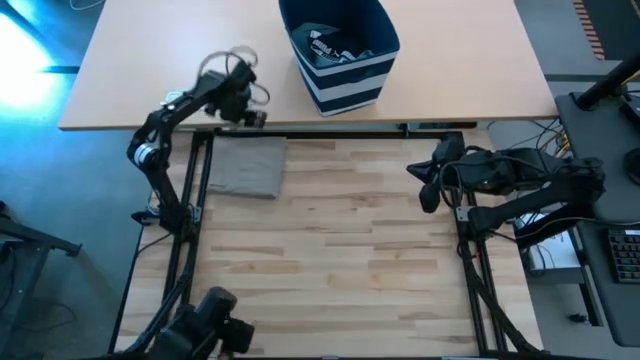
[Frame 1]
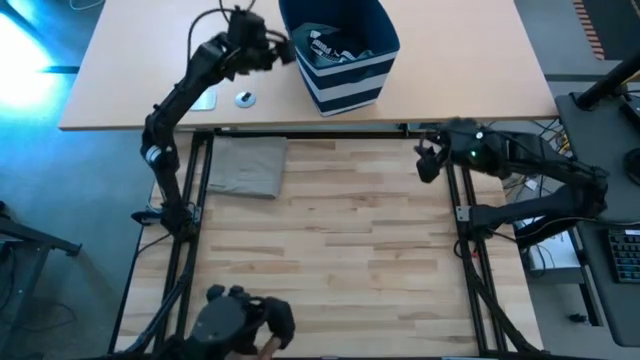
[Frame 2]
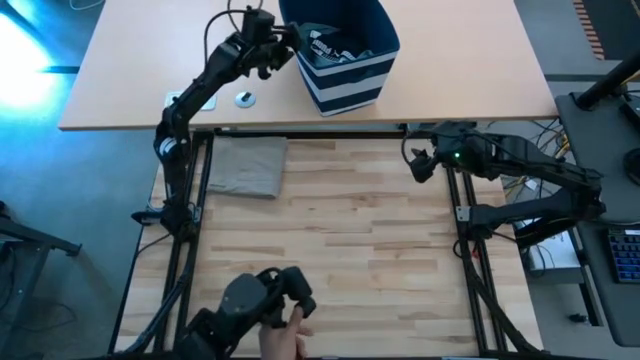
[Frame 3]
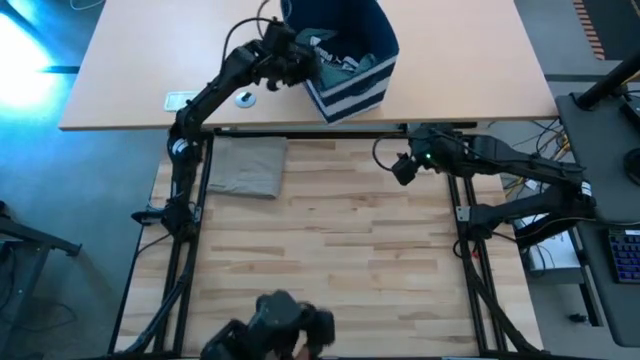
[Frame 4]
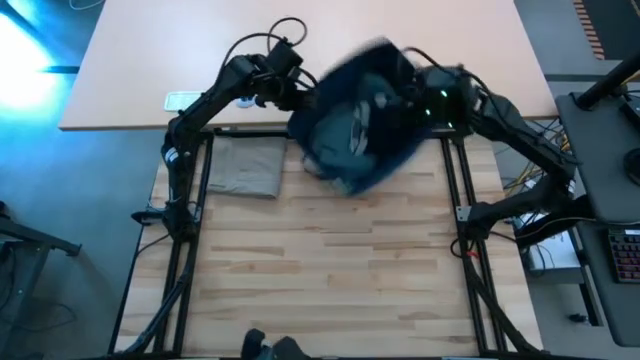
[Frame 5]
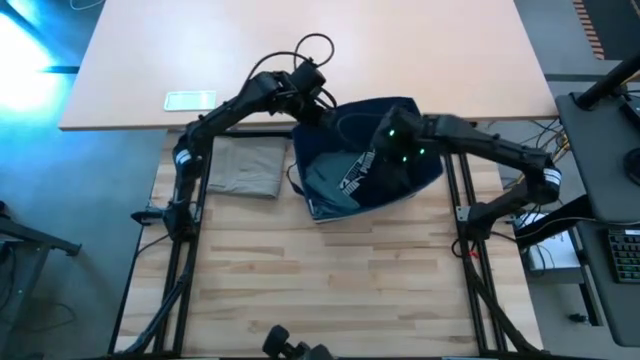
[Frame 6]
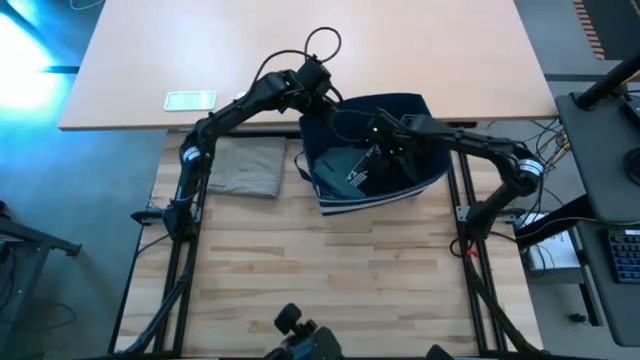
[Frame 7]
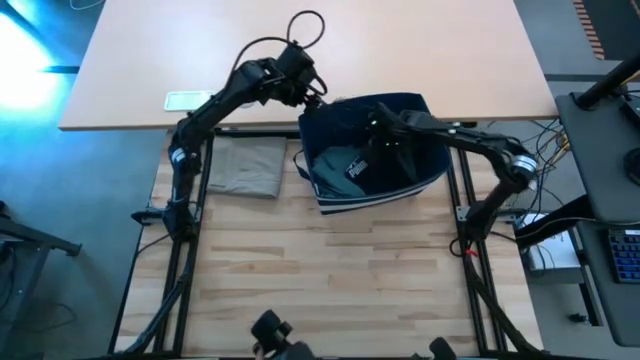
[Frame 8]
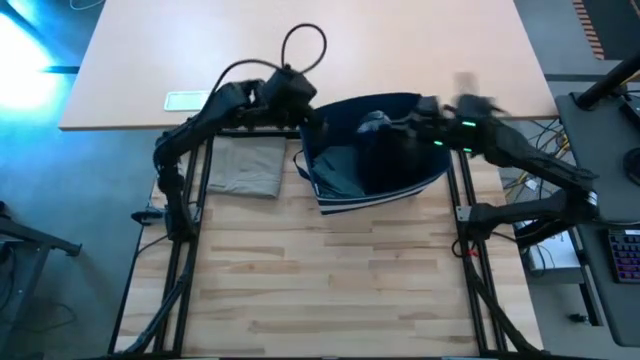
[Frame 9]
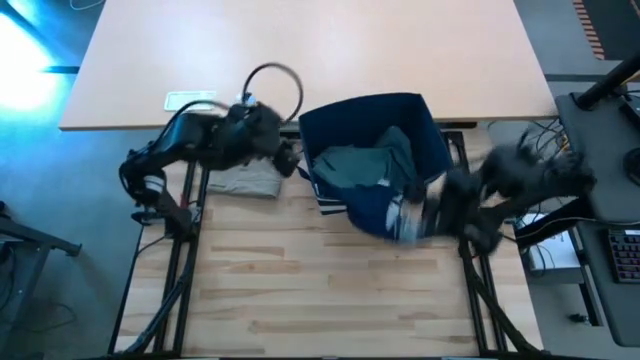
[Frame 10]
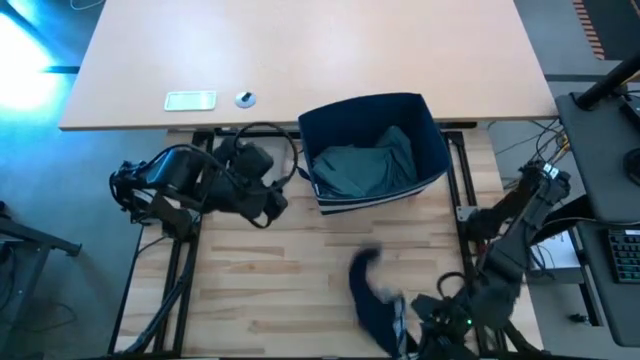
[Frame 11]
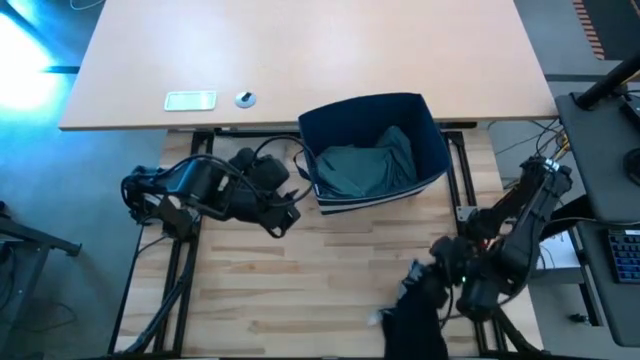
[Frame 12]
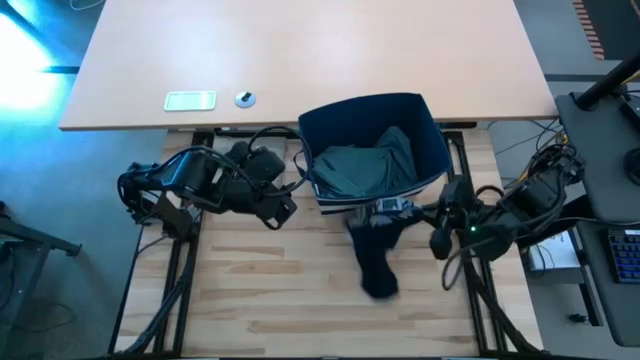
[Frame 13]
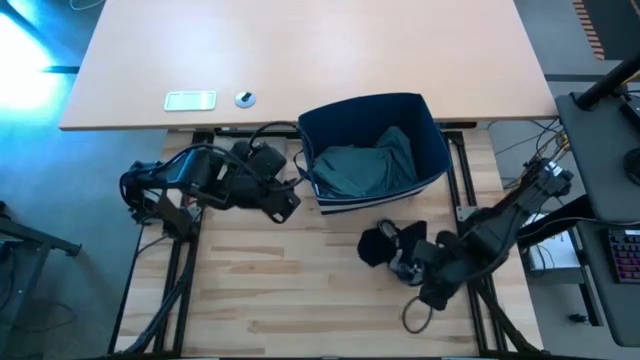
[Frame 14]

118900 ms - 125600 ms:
Task: Fold Laundry from Bin
Remove the black underwear from the laundry basket

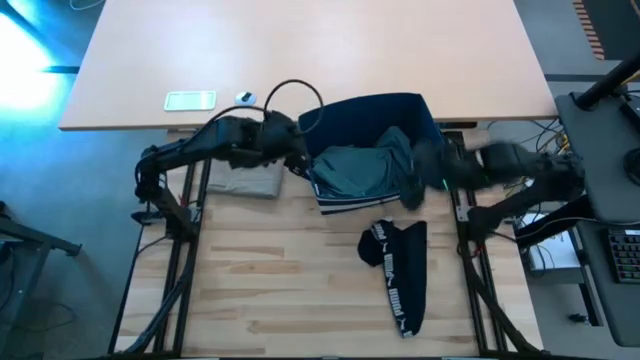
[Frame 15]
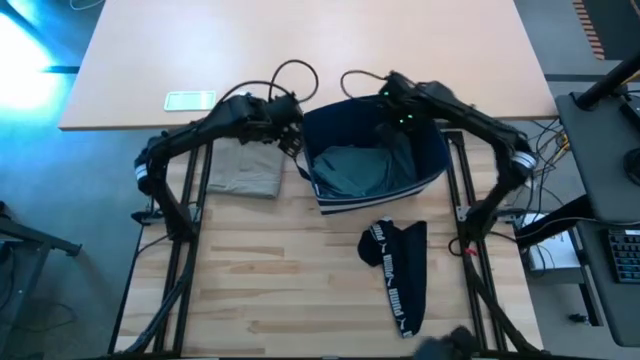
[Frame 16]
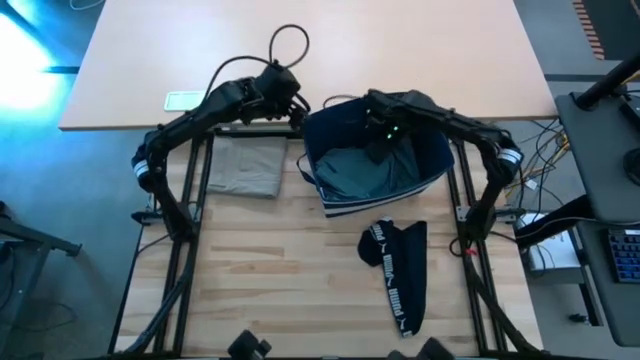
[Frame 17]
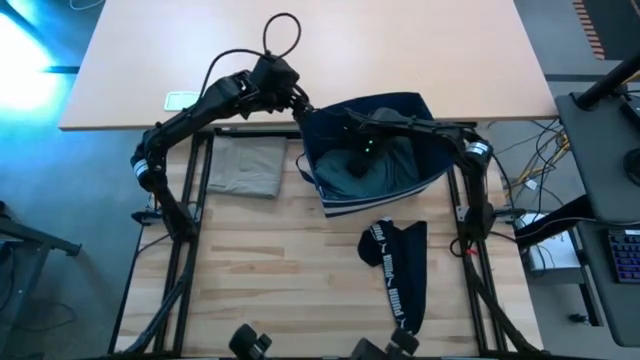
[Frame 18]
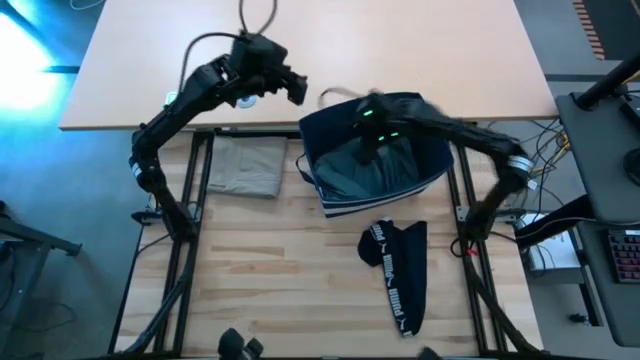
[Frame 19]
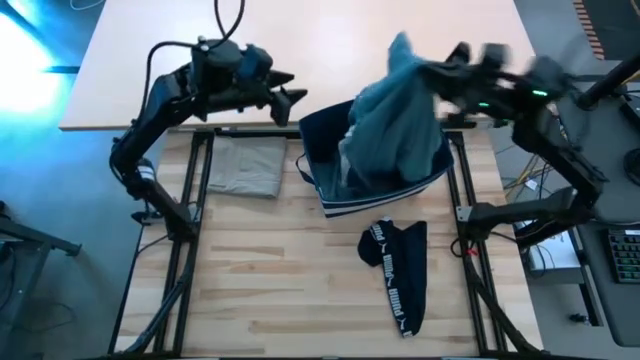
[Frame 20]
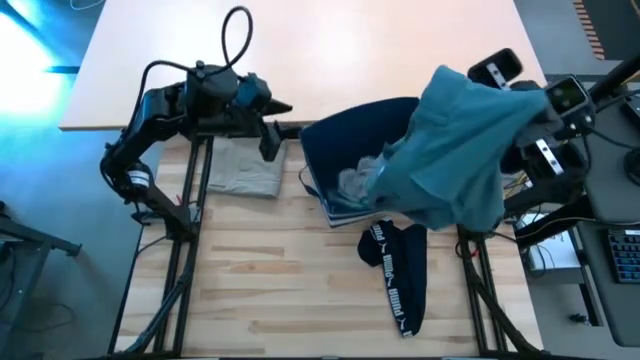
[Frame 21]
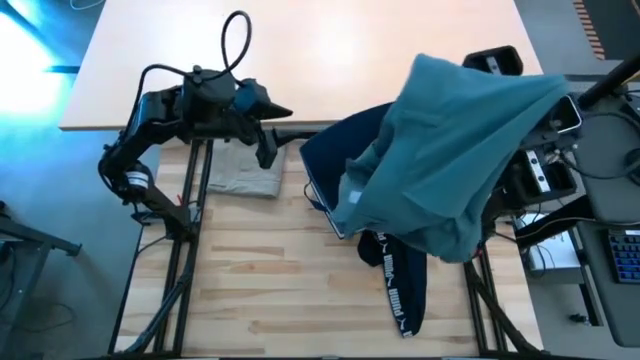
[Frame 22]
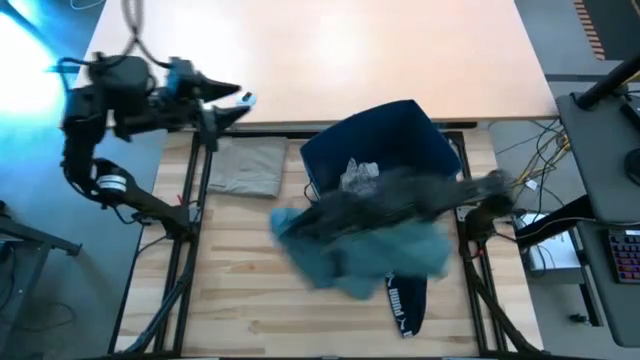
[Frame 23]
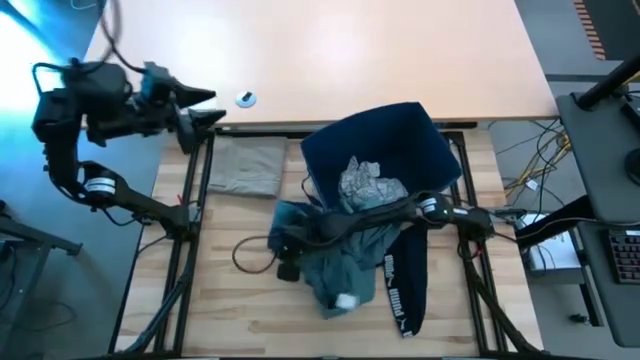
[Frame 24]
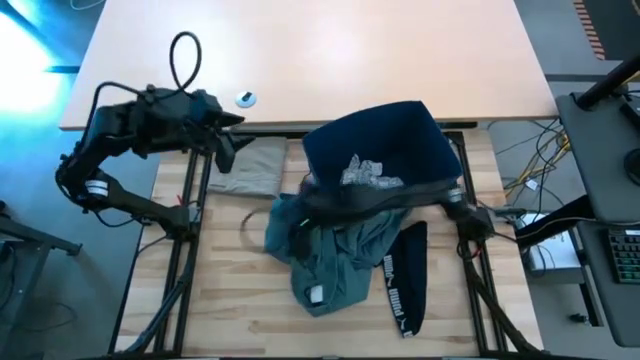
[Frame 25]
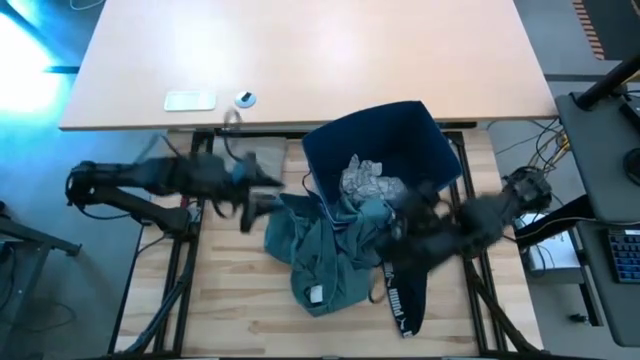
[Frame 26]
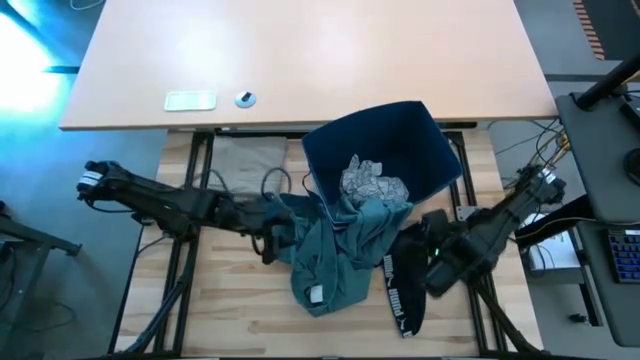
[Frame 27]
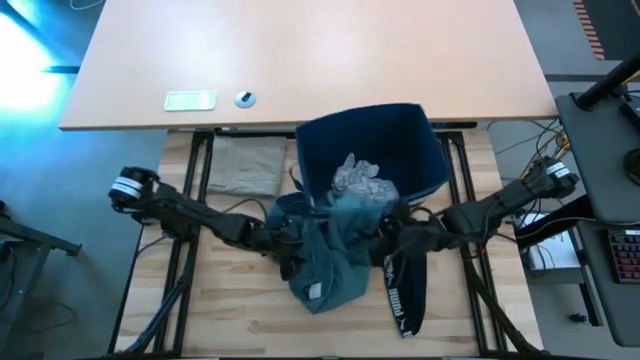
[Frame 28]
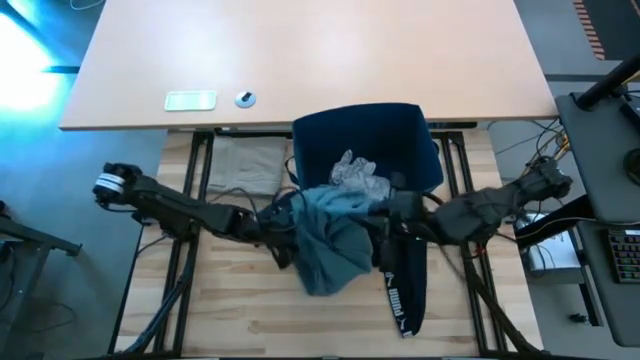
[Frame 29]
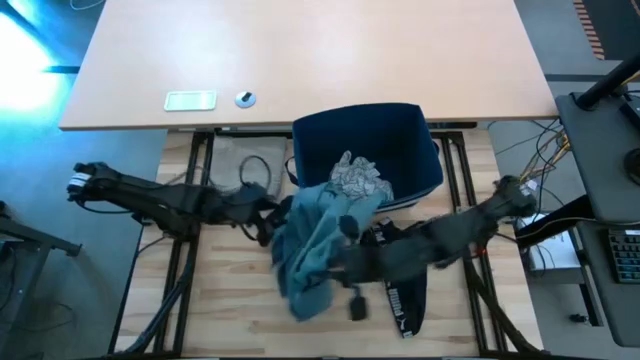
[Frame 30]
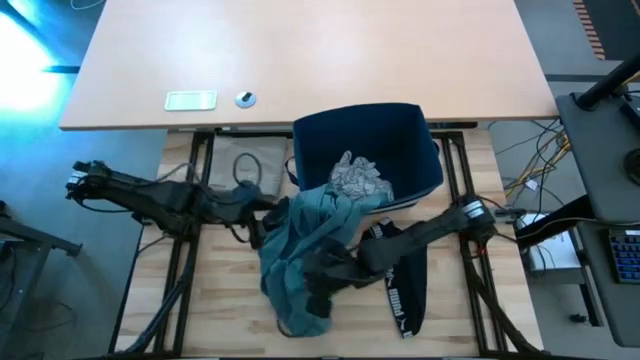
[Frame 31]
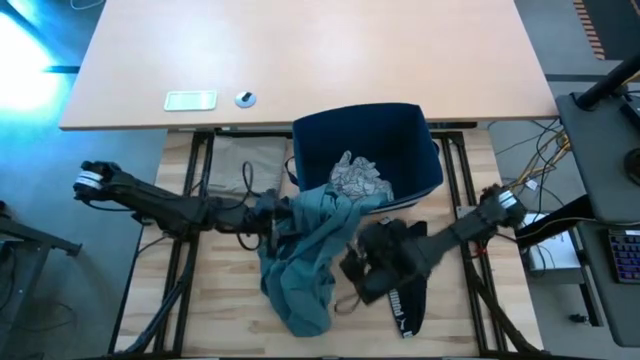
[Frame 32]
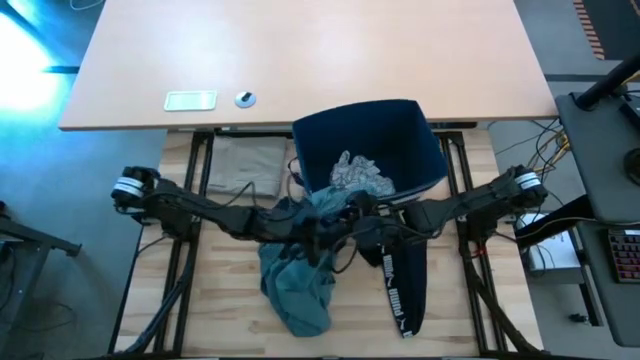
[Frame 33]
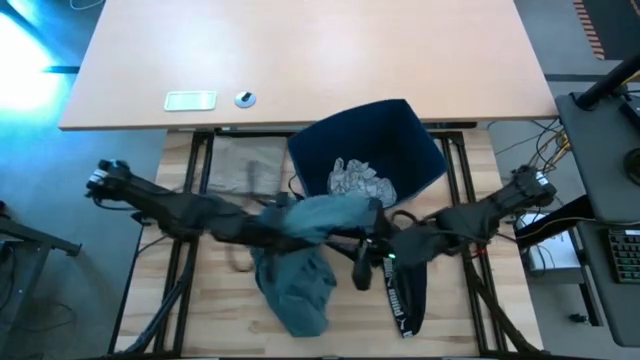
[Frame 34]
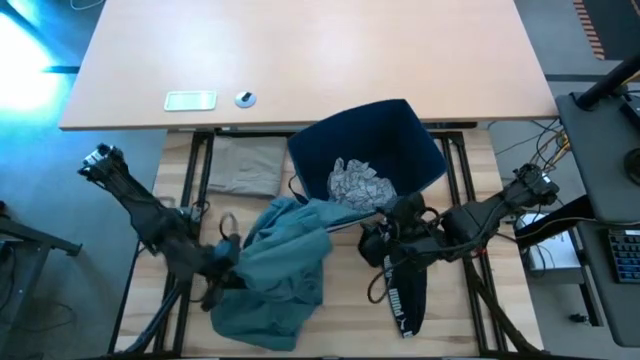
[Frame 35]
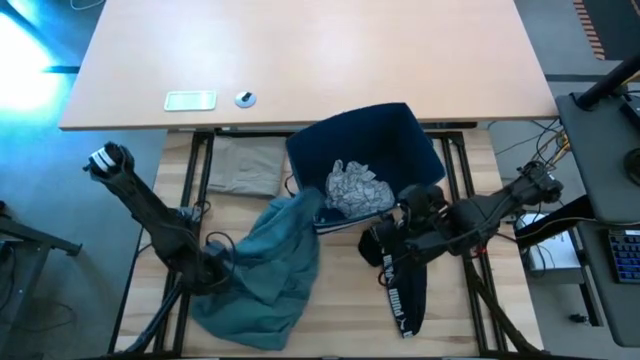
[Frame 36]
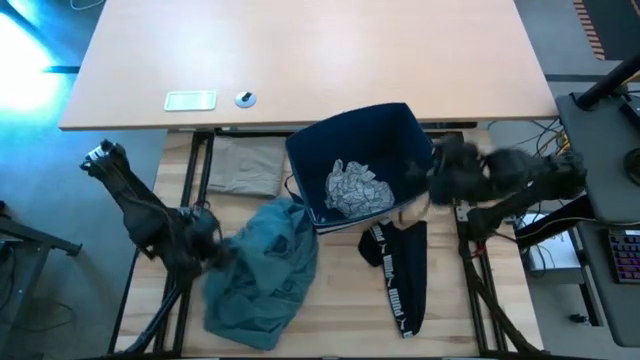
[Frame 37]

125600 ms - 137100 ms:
Remove the gray pants from the laundry basket

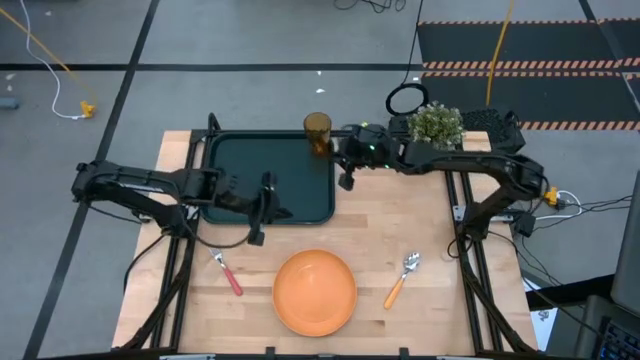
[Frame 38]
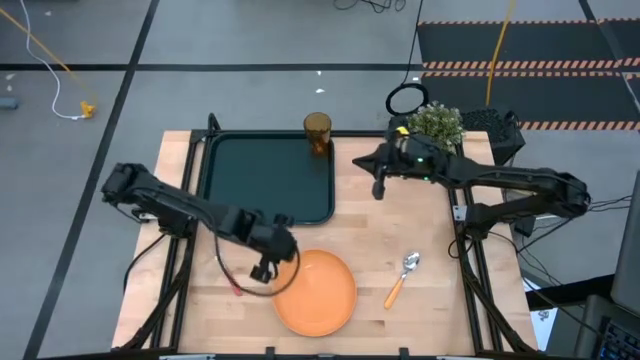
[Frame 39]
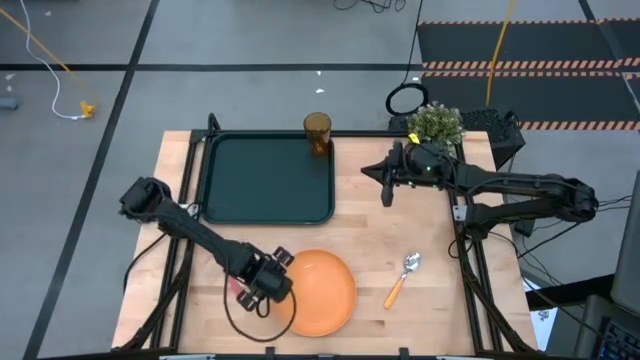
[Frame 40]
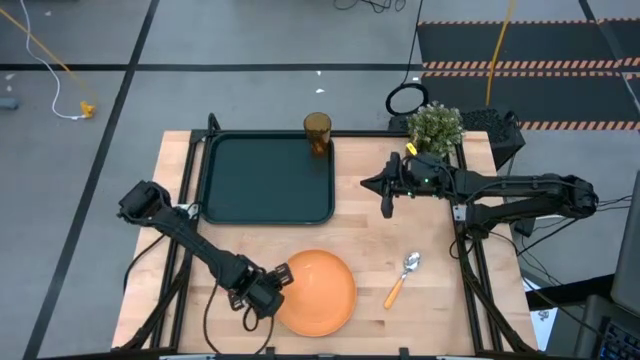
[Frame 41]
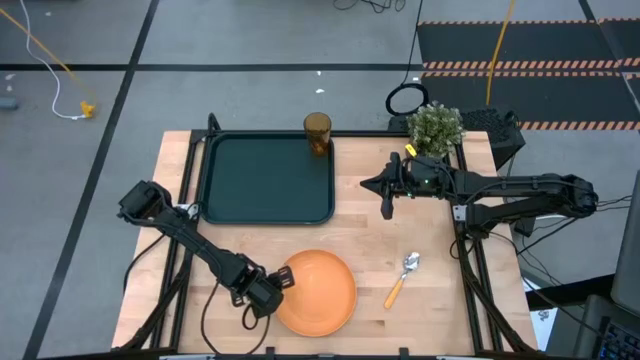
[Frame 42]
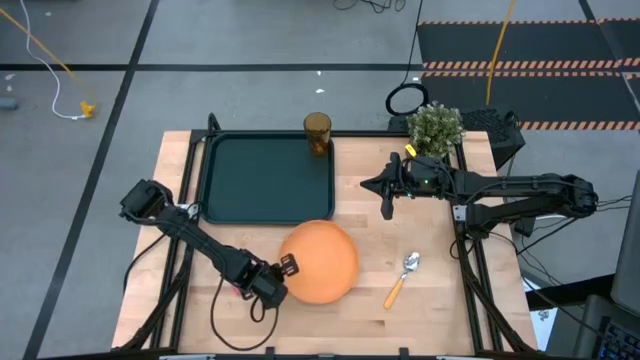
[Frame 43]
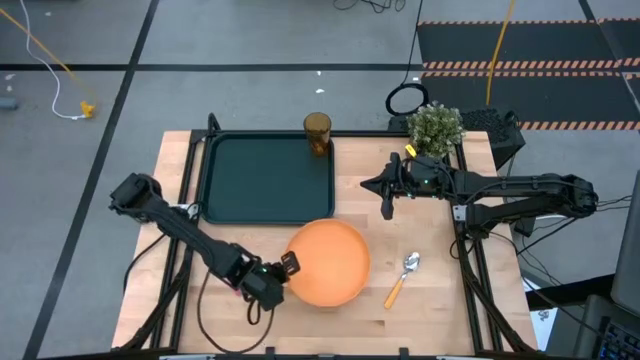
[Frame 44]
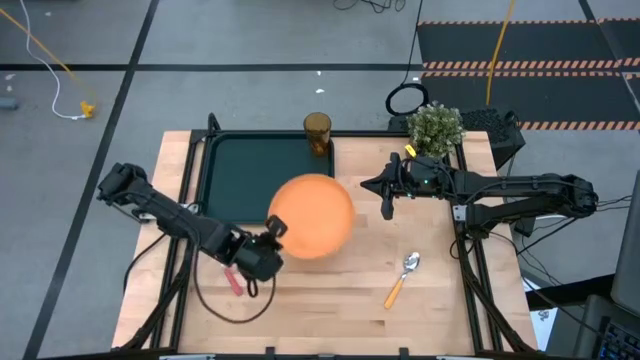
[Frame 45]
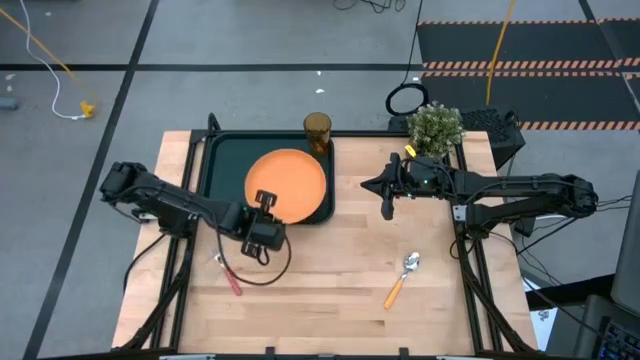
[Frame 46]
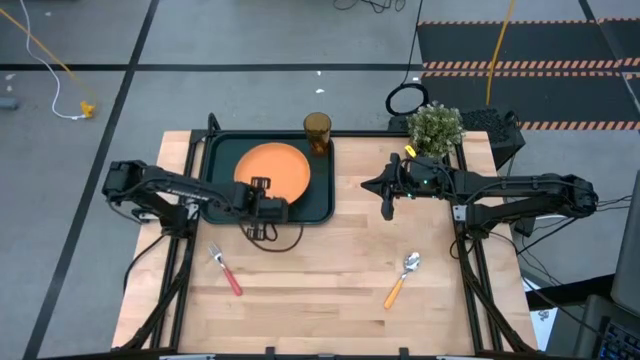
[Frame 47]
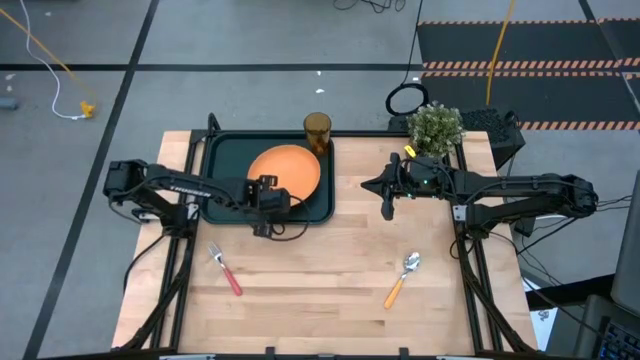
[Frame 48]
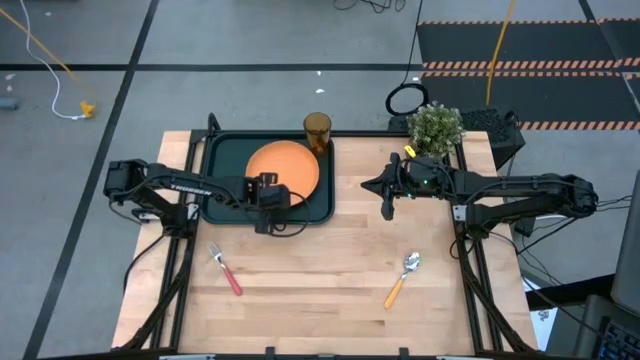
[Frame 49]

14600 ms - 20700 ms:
Task: Pick and place plate/cup/fork/spoon on tray
Put the orange plate on the black tray to the bottom left of the orange cup
